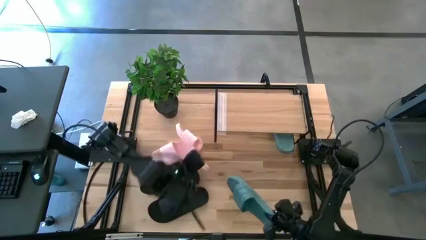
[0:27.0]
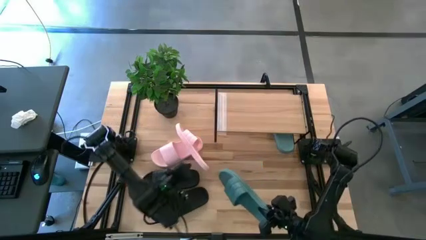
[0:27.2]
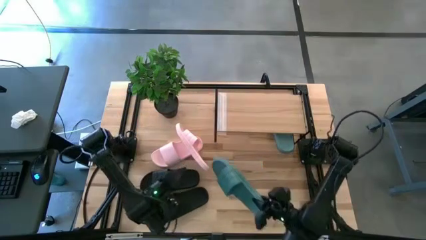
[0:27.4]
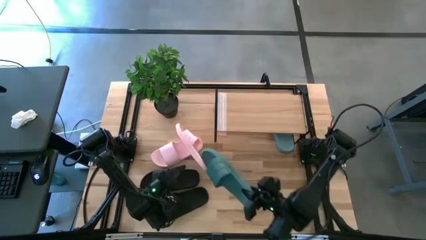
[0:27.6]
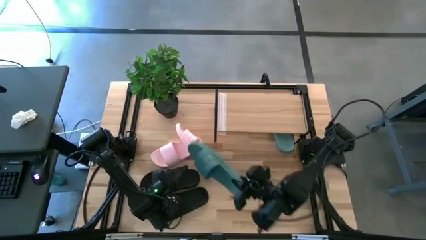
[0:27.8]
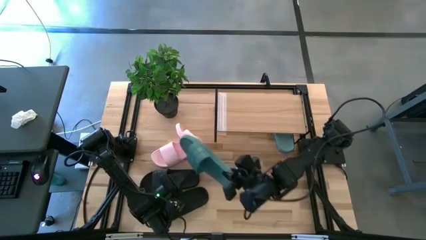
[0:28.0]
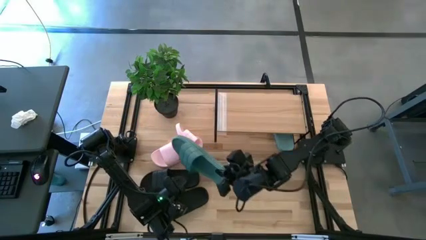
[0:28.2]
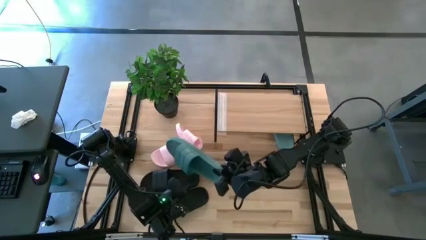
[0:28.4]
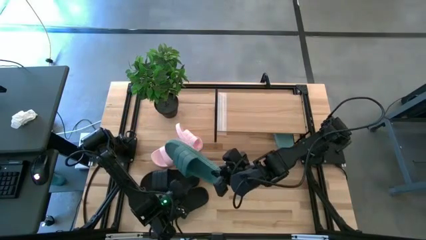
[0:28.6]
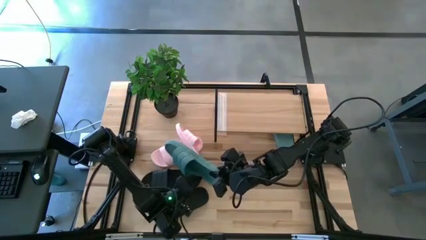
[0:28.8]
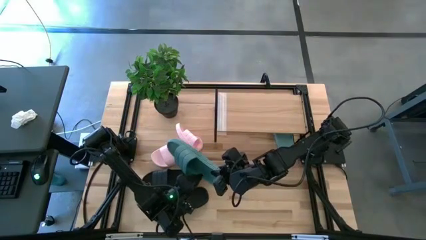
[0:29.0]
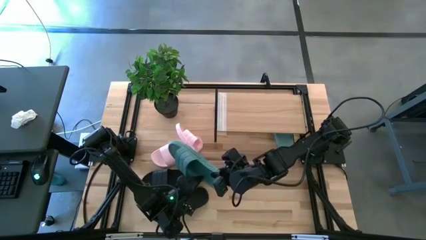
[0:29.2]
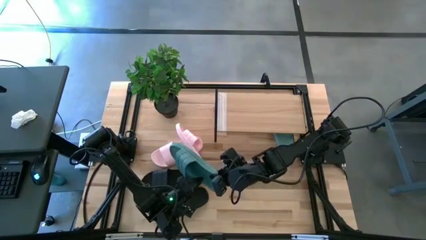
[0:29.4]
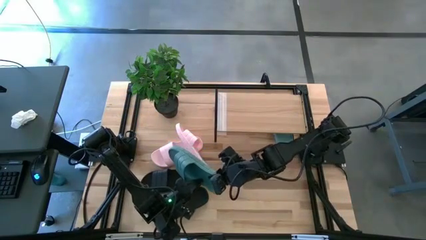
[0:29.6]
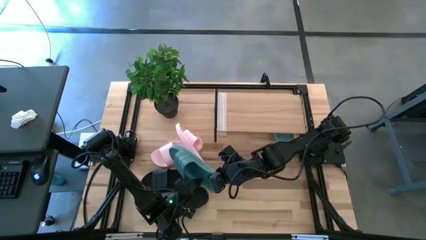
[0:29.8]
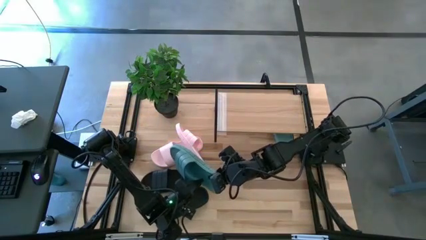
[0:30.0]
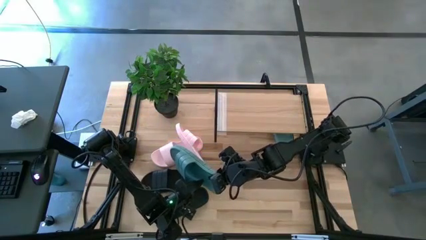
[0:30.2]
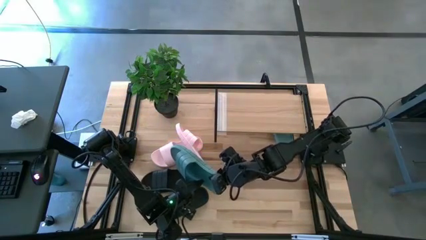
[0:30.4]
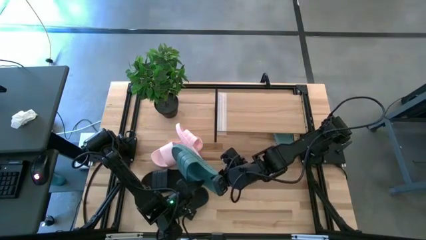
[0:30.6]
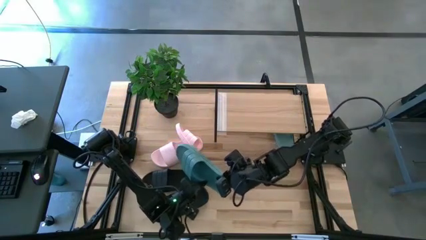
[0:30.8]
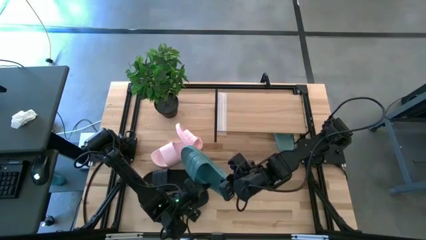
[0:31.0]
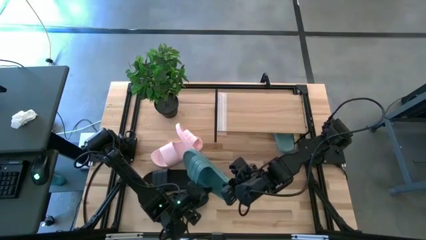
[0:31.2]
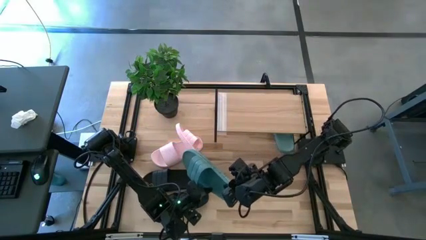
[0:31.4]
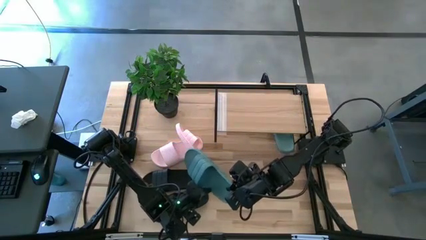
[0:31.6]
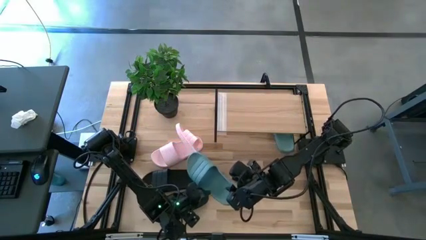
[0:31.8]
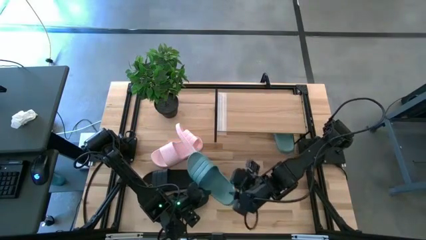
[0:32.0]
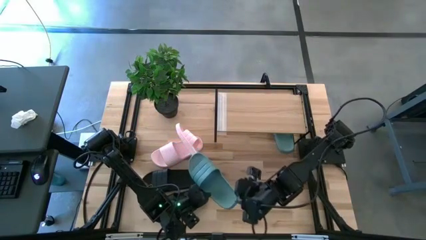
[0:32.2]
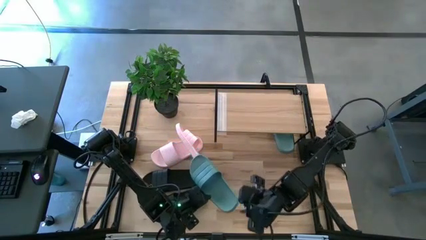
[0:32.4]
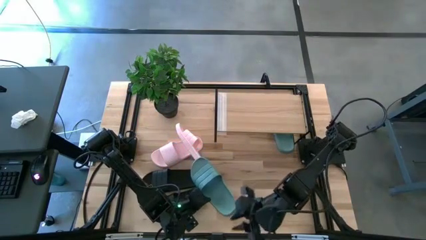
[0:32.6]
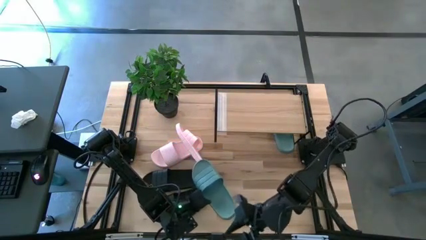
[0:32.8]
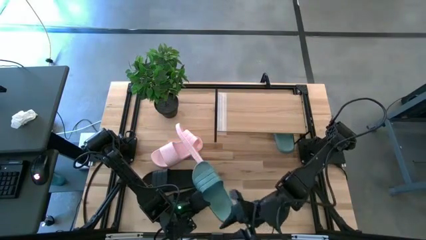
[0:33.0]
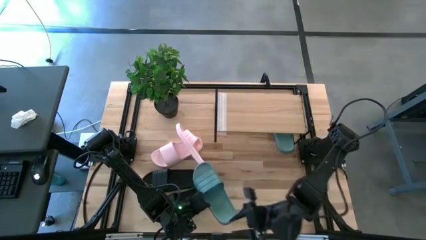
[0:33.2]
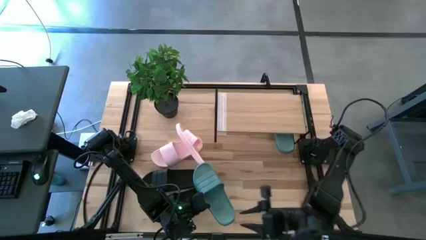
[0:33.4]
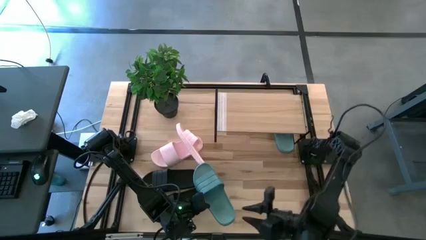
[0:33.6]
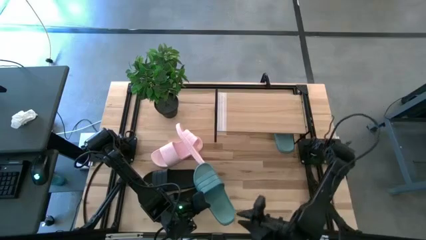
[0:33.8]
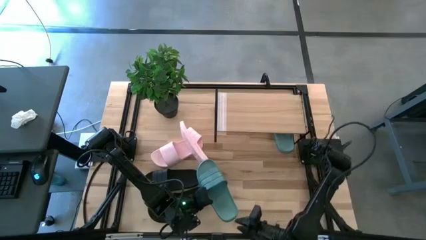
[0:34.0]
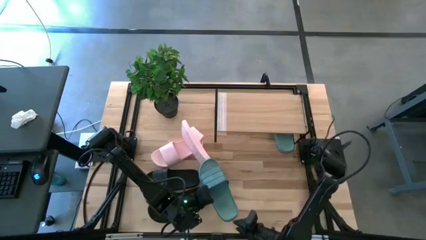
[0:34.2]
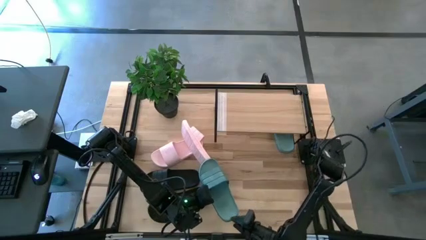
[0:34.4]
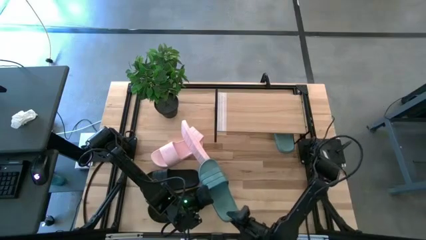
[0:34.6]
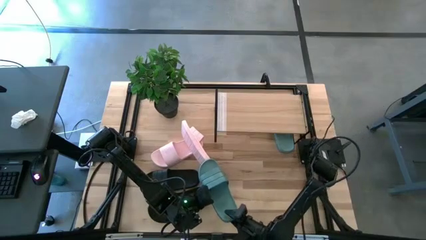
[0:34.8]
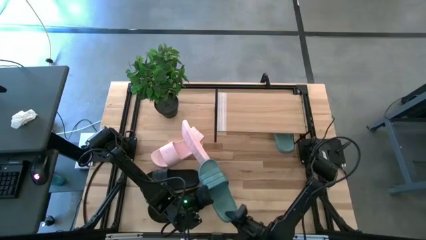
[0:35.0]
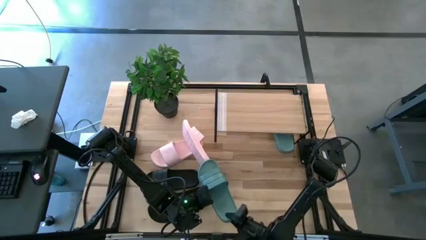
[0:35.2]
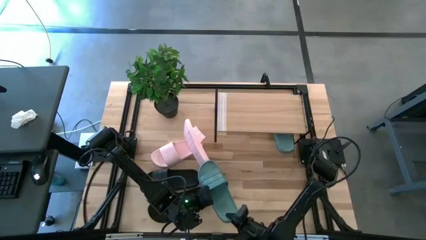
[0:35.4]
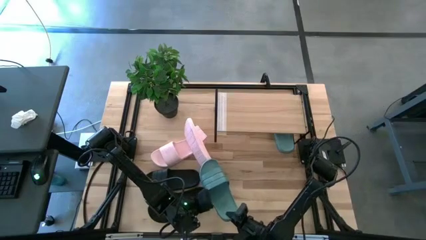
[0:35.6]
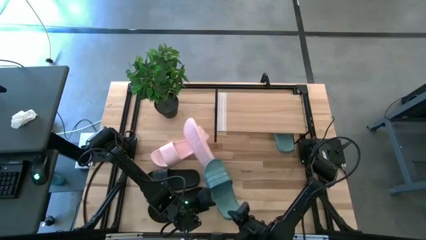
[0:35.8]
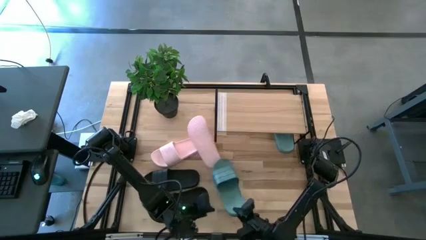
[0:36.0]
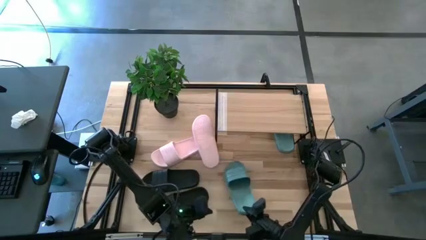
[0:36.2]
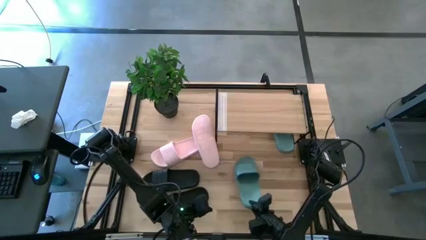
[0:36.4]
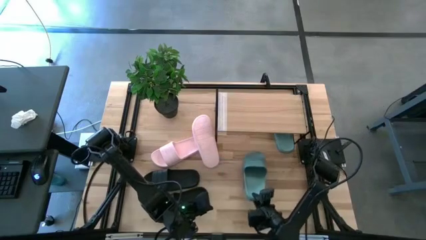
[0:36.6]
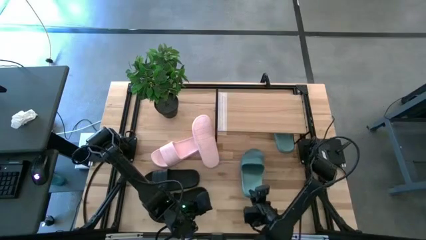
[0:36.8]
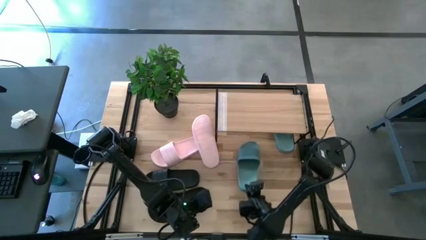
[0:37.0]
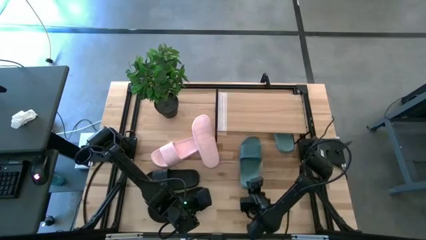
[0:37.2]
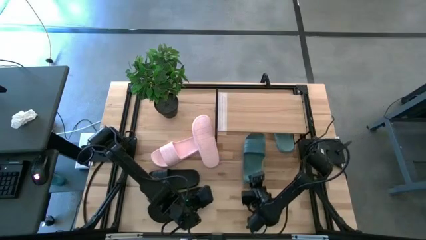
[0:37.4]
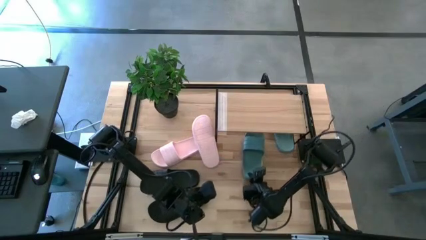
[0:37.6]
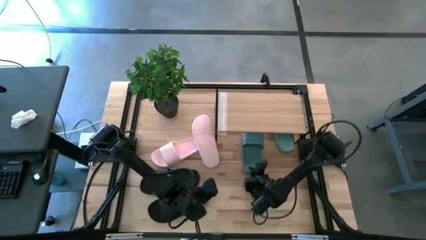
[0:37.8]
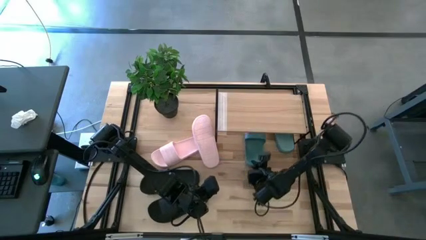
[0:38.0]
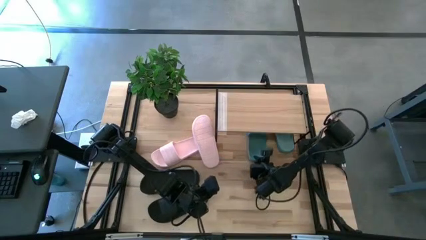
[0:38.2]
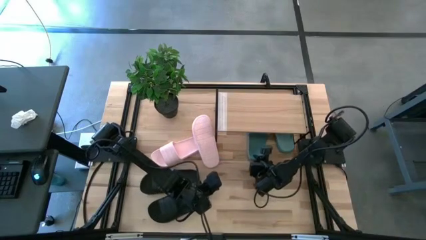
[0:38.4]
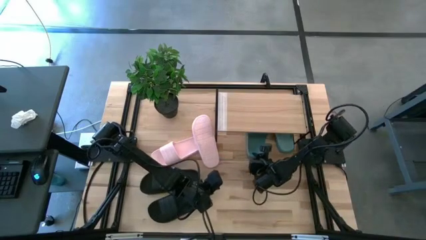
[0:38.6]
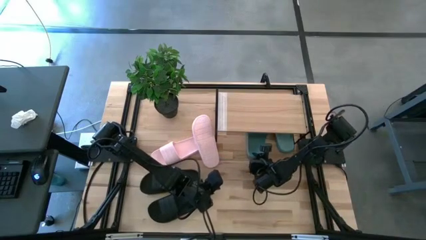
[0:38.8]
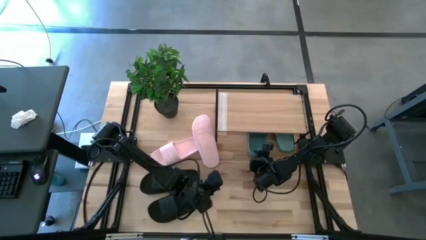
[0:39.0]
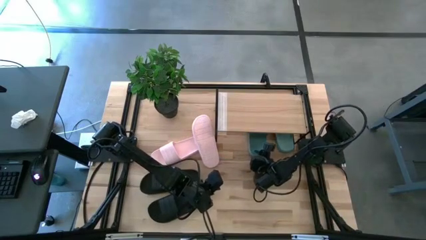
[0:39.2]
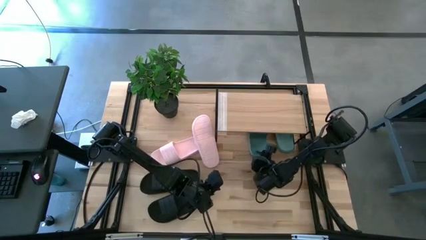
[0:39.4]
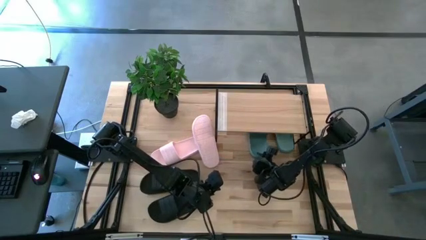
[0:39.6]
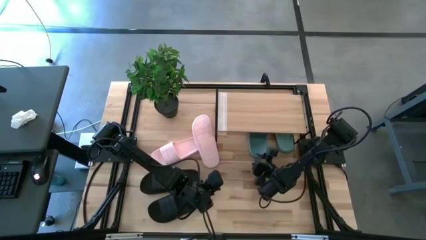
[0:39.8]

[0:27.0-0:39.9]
Task: Pick and place slides into the shelf
Put the green slide under the shelf
